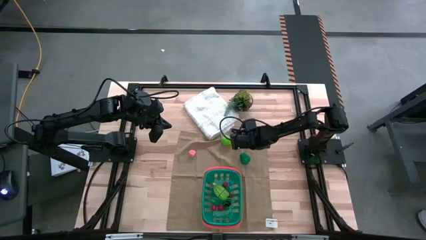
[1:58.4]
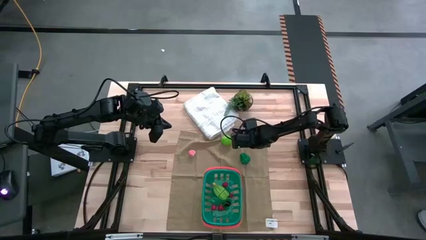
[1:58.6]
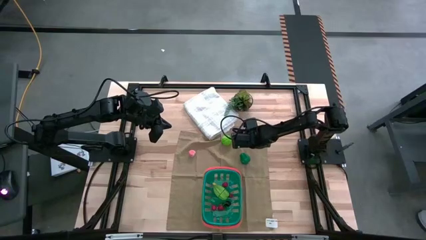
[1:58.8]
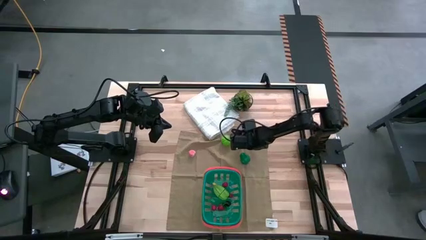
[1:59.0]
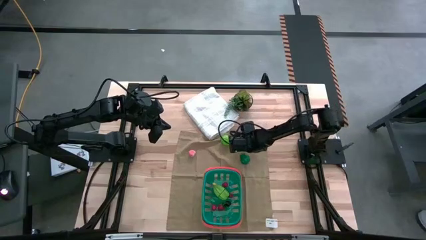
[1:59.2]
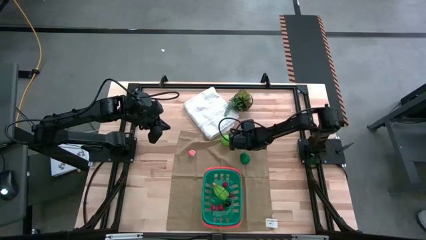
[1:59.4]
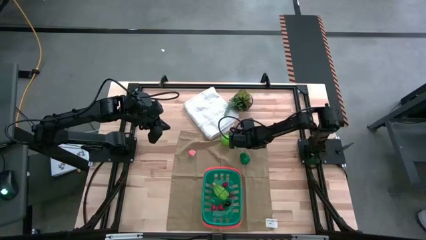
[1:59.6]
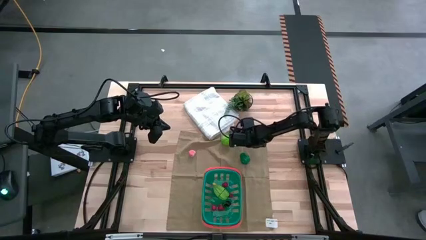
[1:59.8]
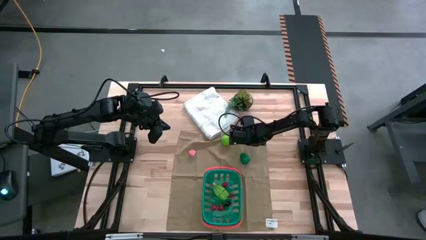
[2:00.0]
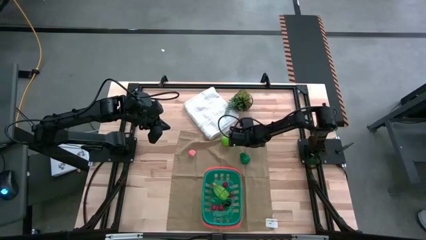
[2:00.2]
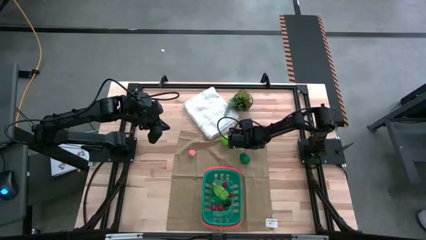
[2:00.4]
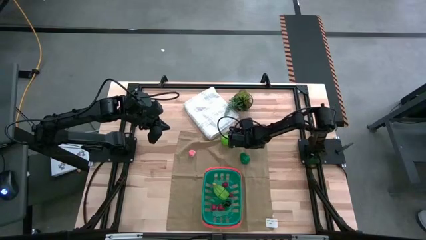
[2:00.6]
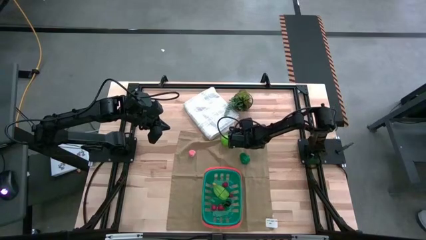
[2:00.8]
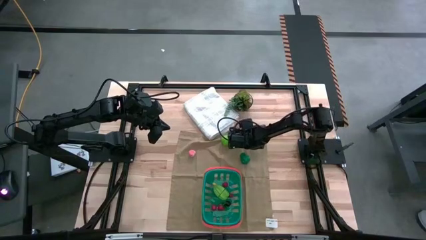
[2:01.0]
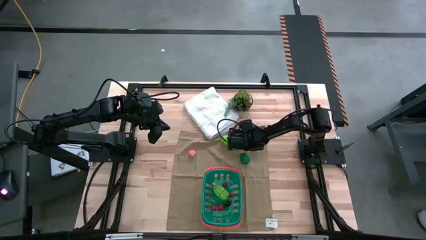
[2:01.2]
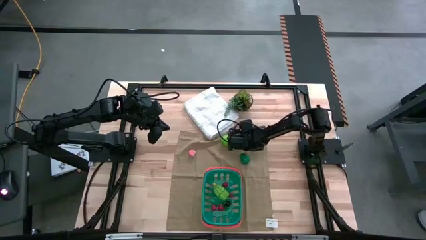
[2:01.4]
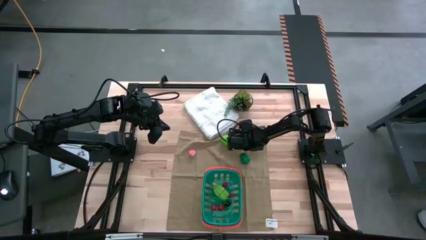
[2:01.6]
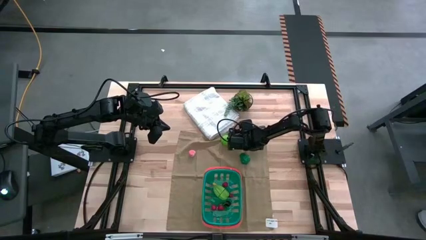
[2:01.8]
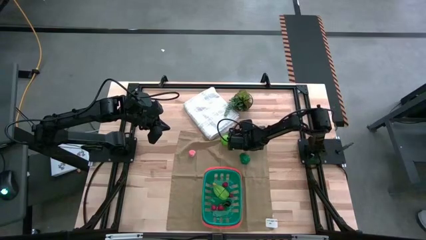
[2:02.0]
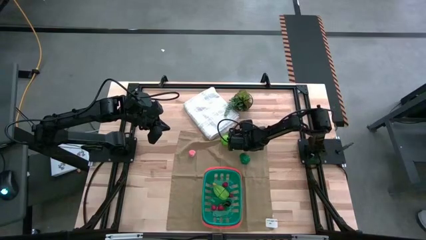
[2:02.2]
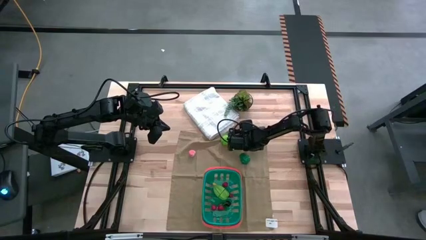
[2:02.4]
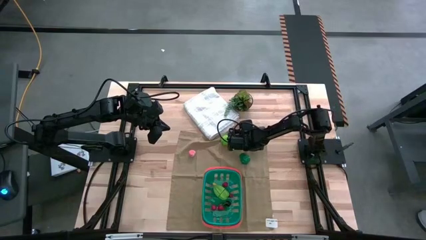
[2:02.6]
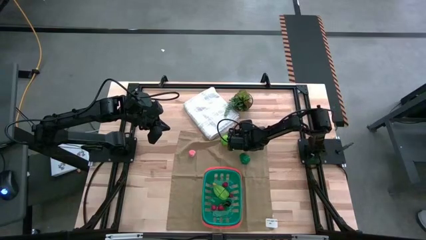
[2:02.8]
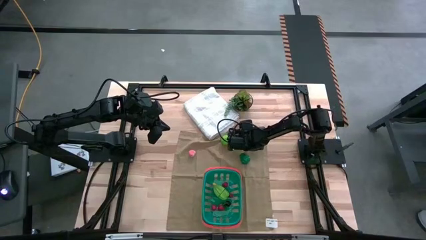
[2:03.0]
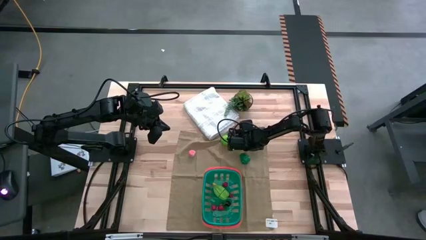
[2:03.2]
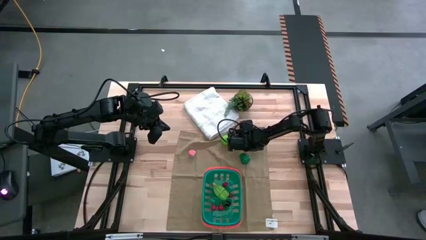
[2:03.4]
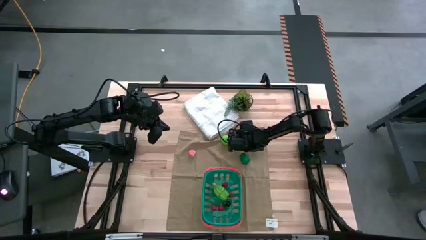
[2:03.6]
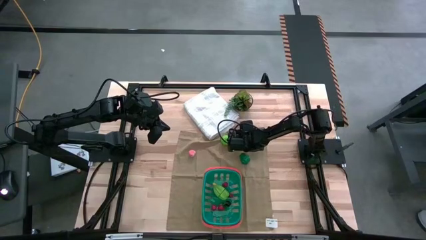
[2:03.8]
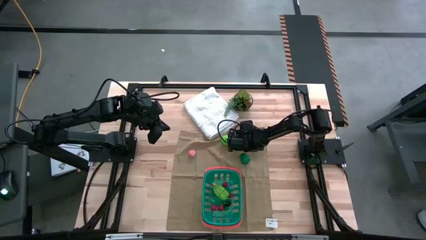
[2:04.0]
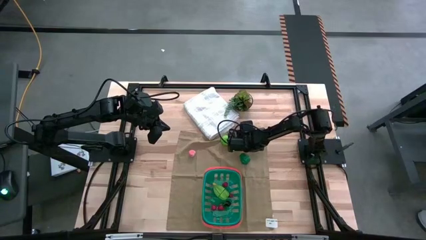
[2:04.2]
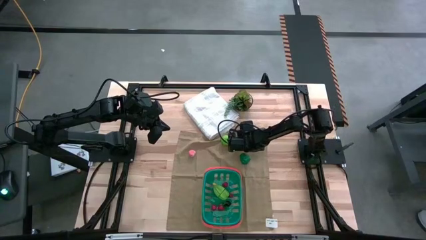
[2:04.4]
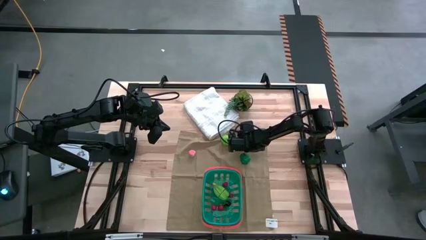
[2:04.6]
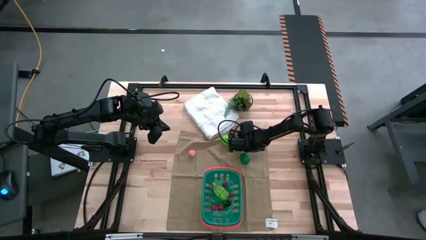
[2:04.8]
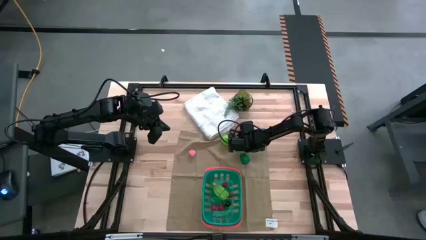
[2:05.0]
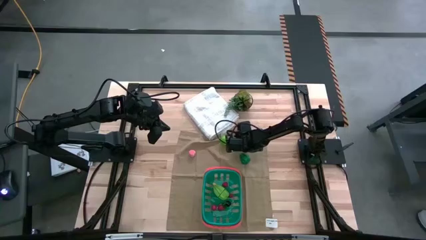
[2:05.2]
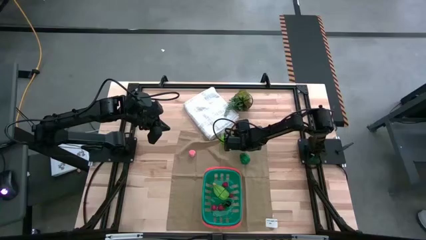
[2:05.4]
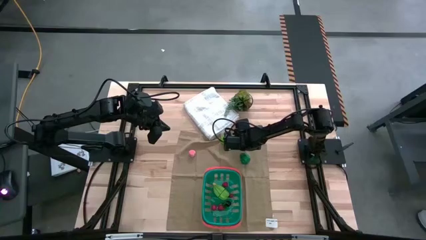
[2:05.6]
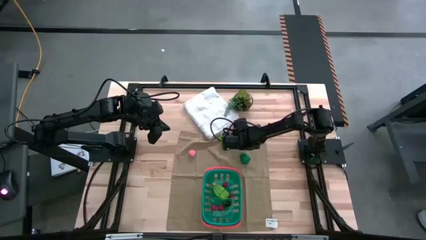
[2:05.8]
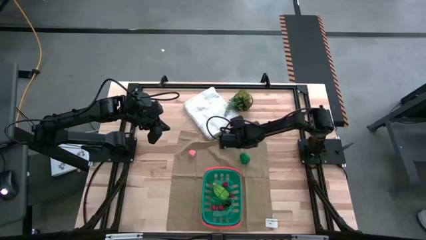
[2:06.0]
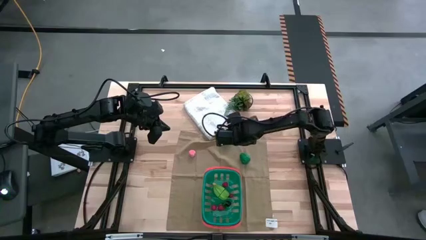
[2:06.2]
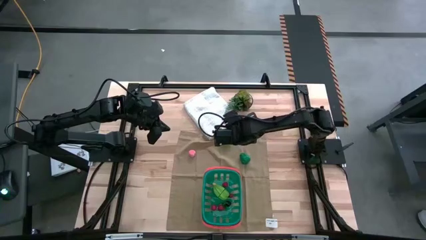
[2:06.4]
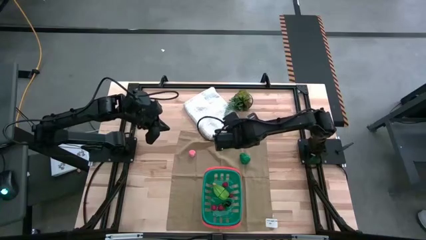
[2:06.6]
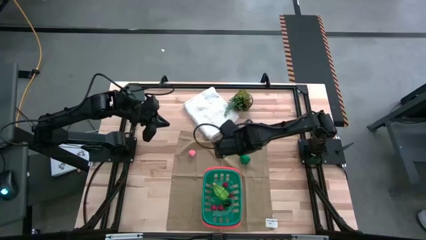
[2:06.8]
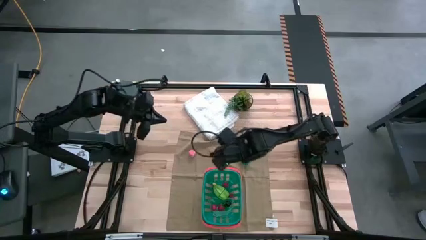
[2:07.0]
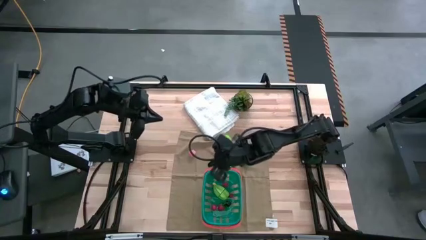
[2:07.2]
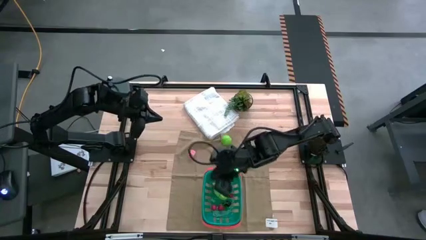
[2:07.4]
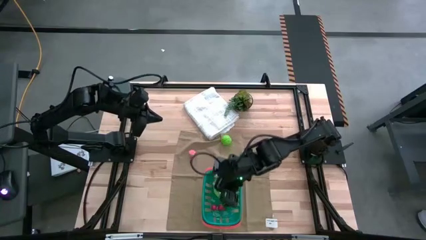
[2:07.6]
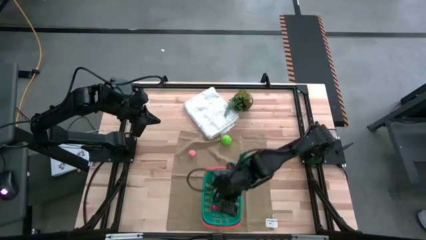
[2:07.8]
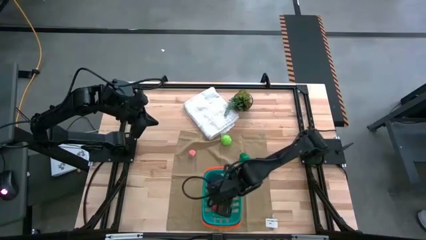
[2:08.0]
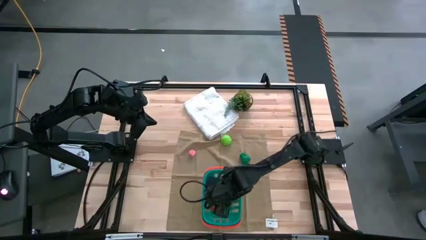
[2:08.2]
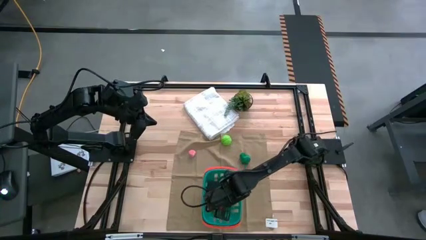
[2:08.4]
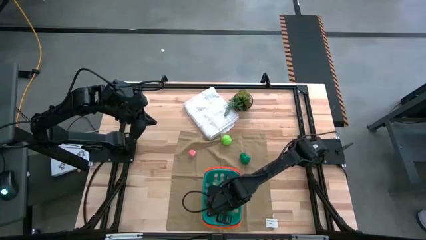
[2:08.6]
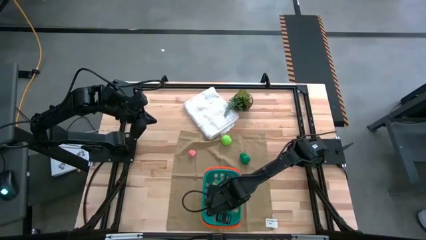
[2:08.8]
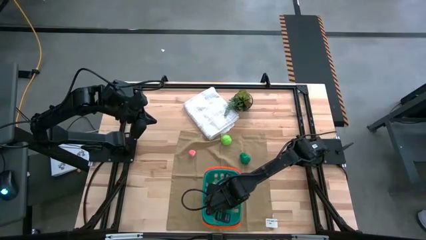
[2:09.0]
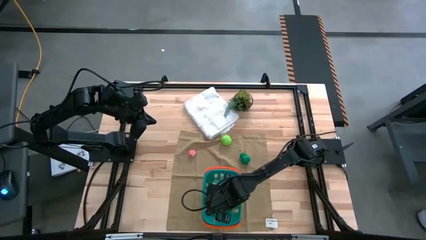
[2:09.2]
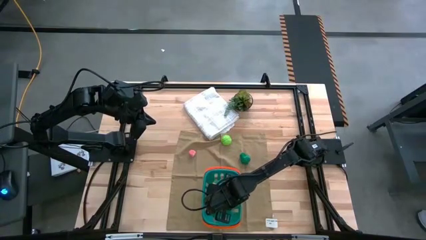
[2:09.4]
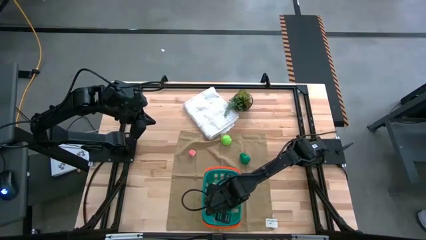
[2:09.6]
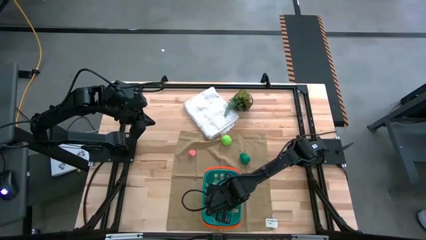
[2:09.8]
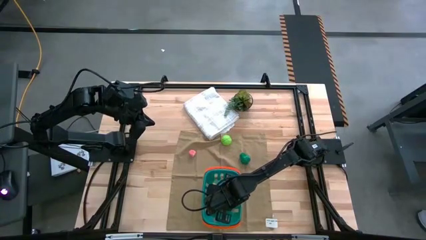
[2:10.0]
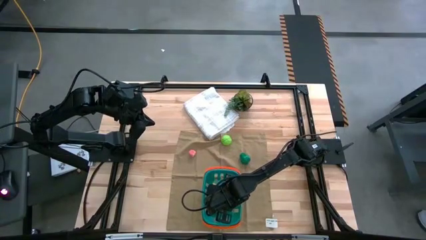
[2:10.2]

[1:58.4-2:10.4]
Task: Pick and placing Produce into tupperware
Put the blueberry into the blue bin

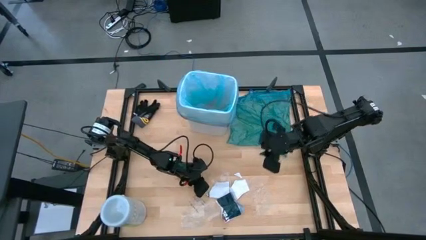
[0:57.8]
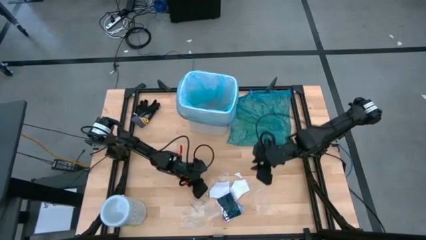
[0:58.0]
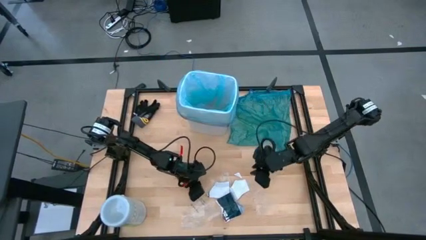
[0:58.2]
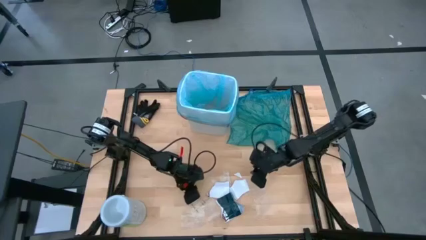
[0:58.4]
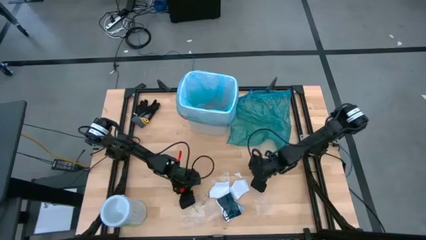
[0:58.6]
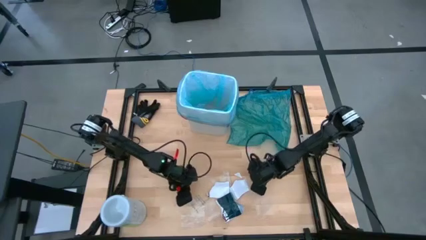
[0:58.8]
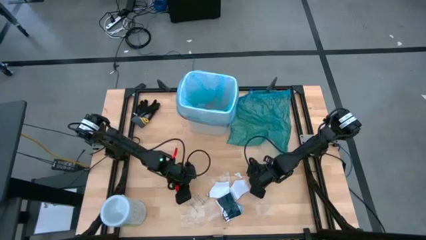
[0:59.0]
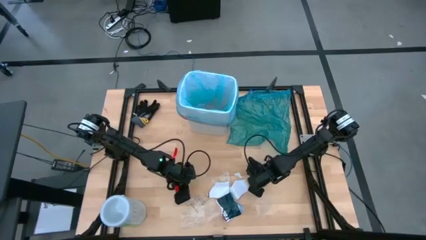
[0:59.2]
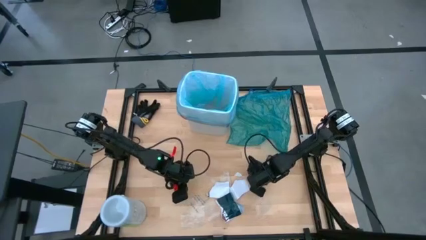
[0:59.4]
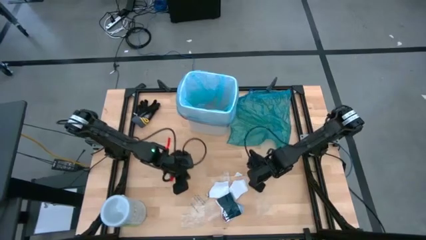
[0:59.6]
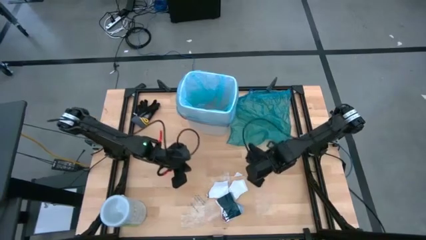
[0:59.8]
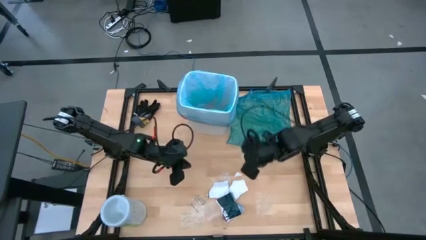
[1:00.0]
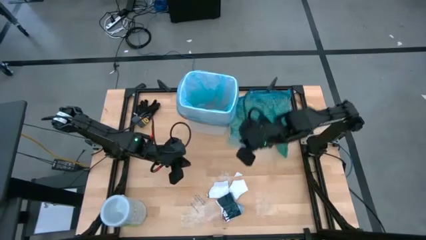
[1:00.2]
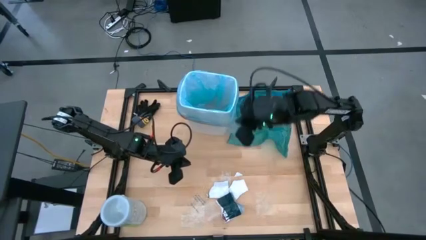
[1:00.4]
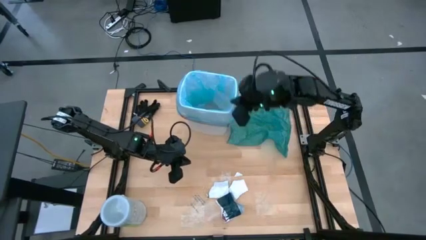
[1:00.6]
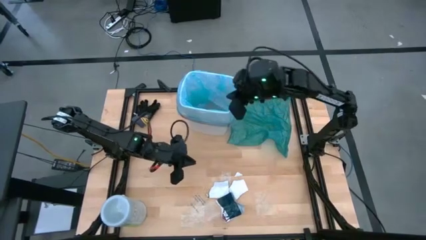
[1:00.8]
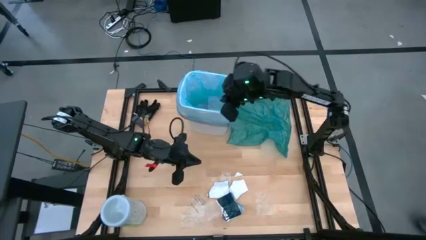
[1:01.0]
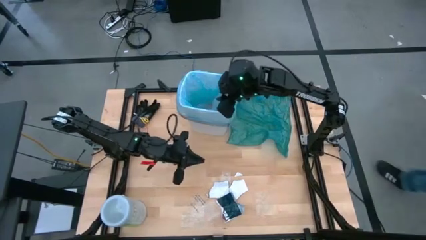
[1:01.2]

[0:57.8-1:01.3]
Task: place trash/remove bag and relplace
Put the transparent plastic into the trash bin
